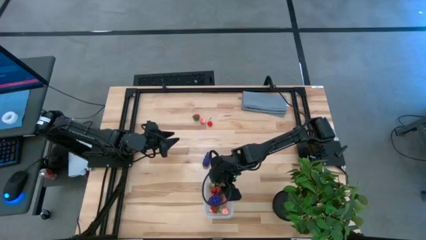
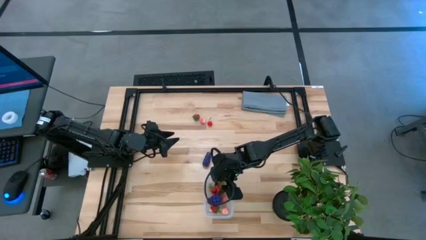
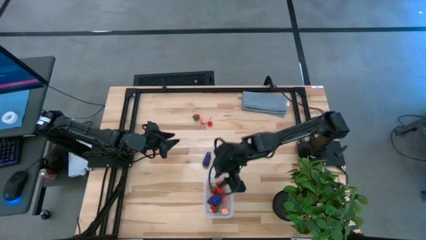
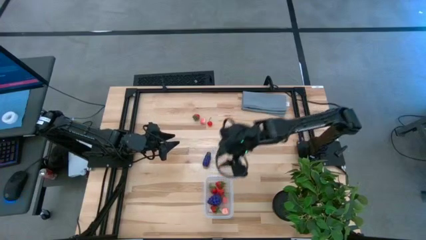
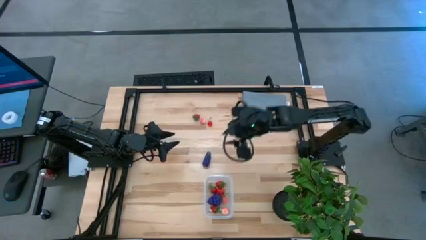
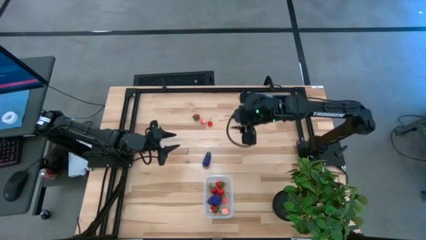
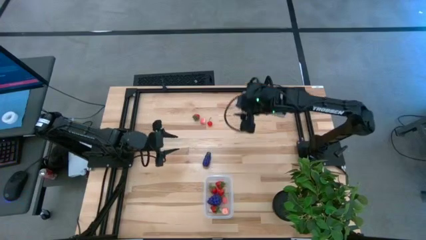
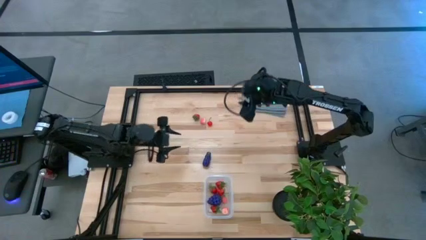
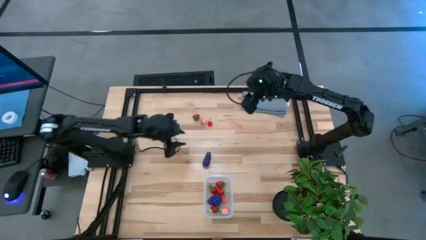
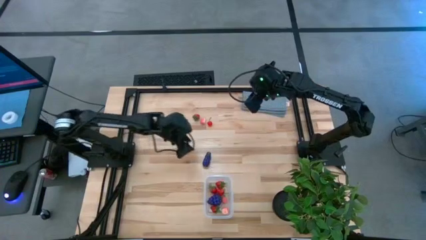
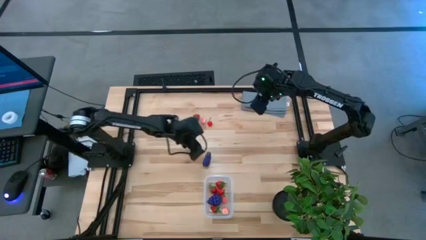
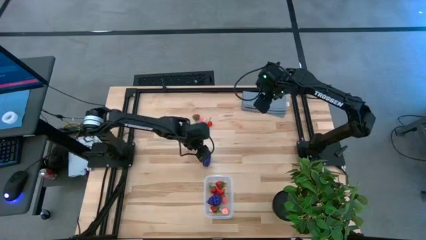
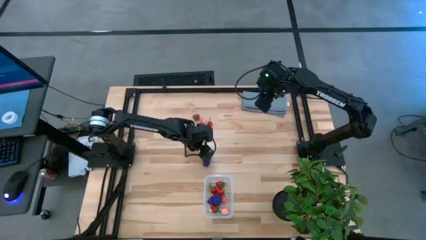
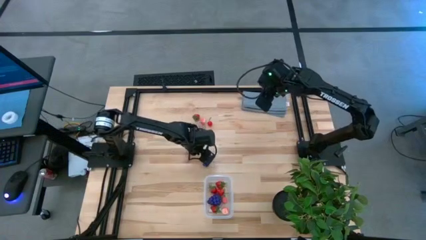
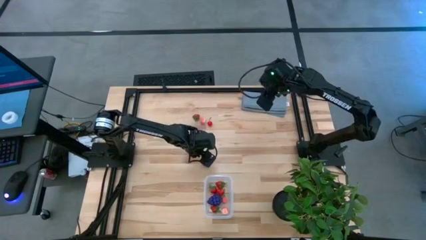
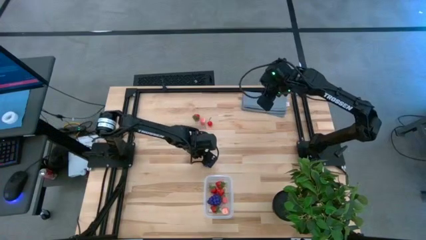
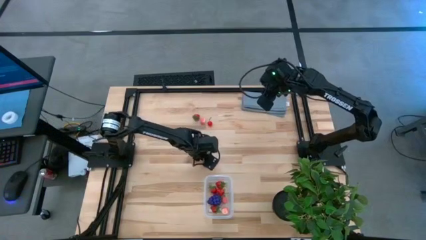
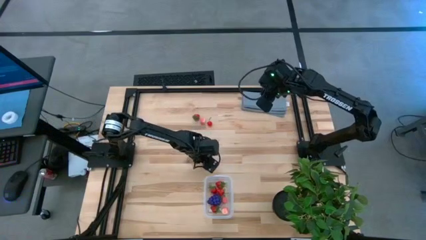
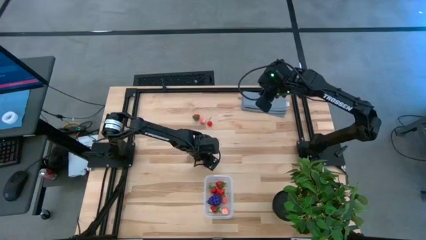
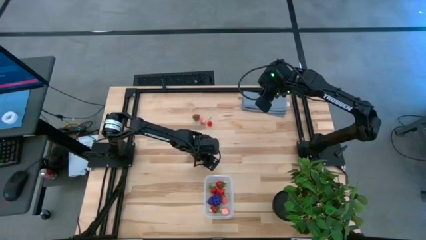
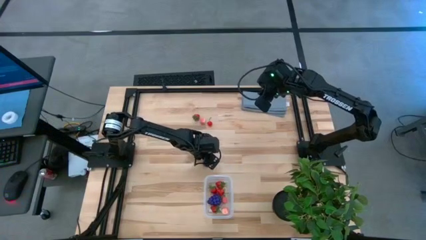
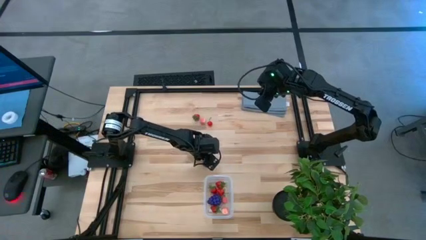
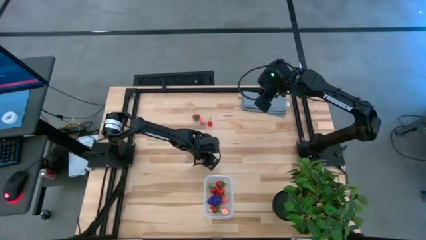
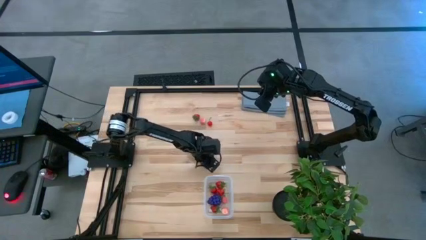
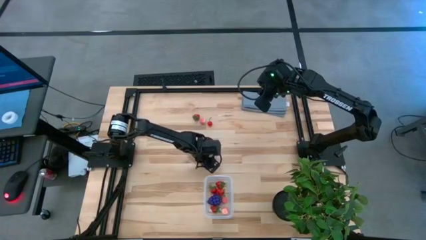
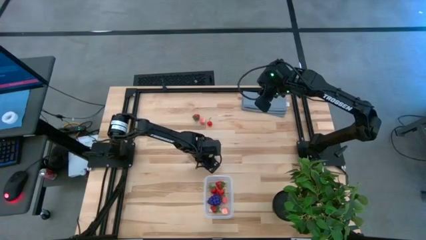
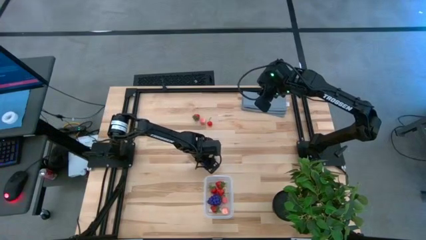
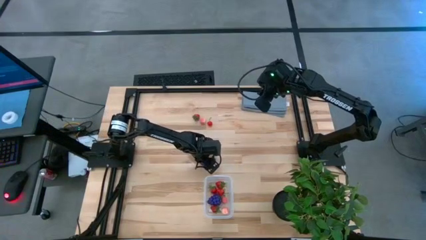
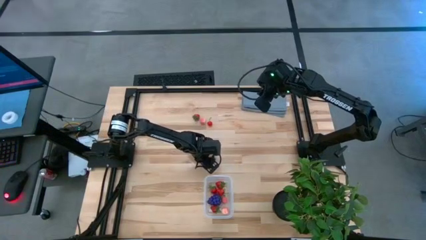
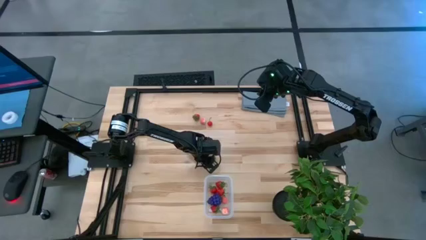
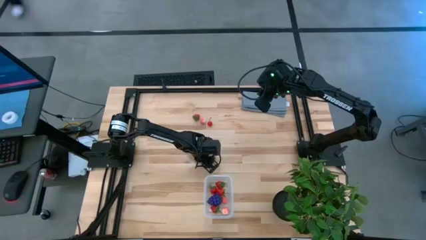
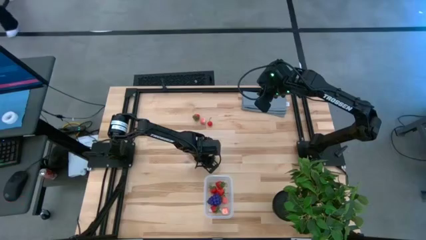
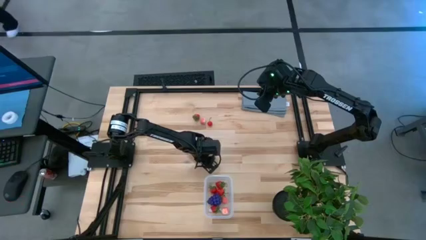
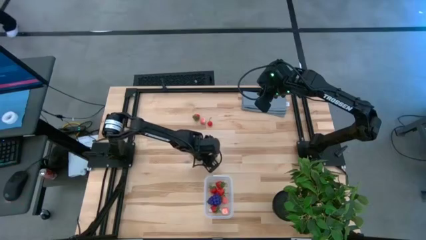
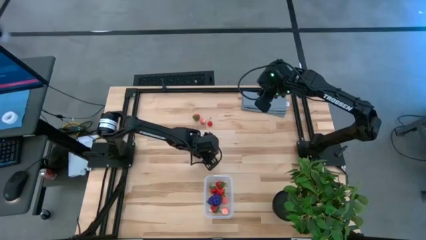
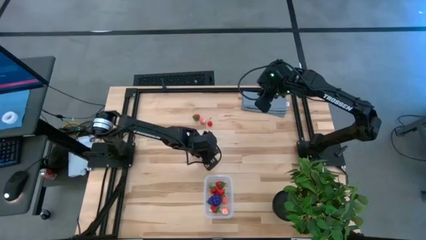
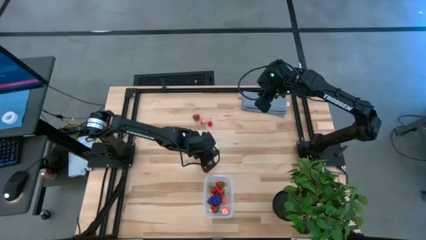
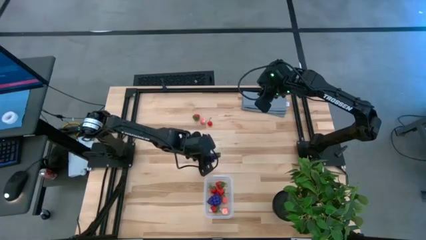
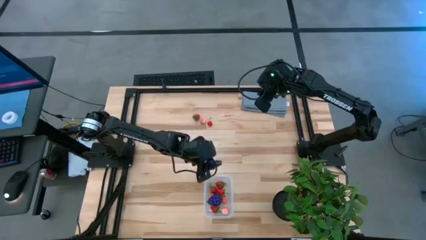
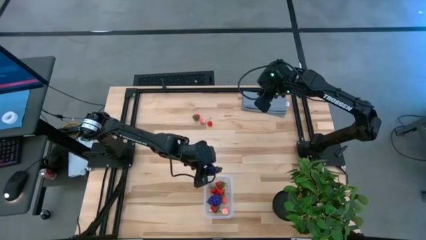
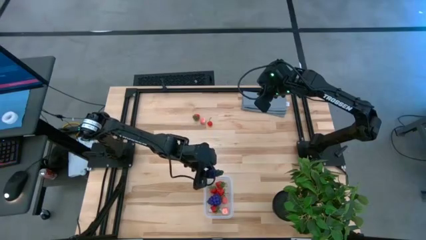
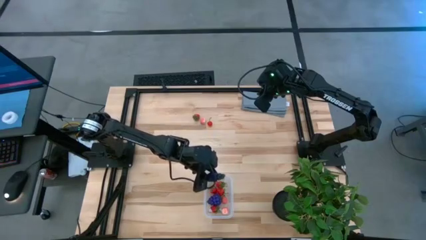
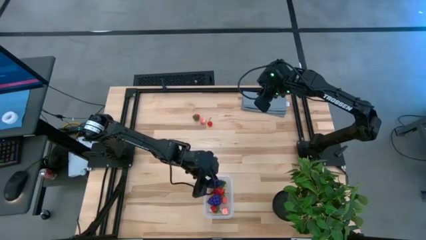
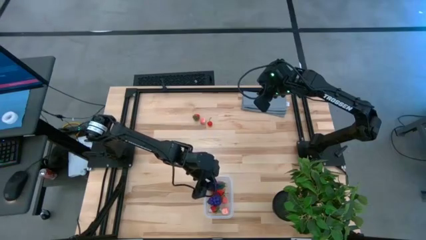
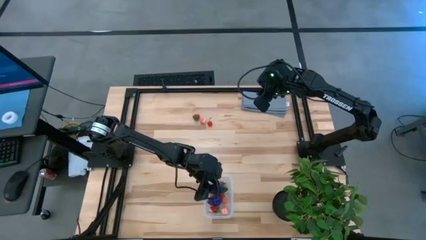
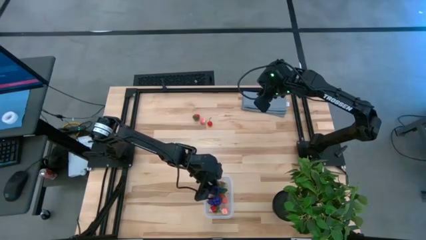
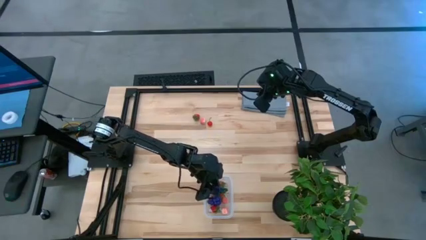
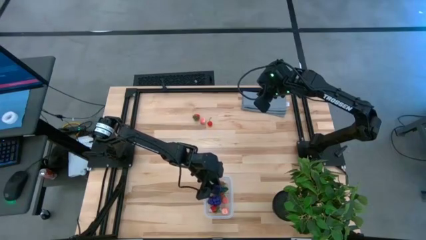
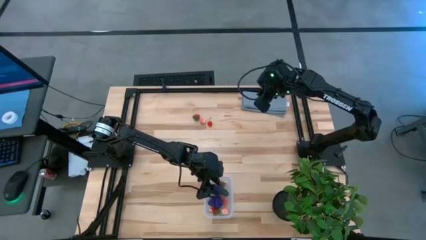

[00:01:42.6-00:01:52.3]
Task: Pick and placing Produce into tupperware
Put the violet eggplant into the transparent bin

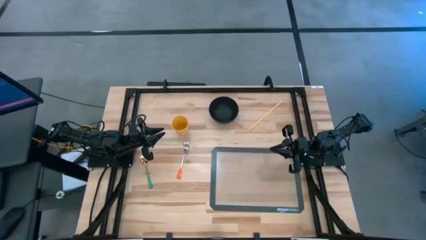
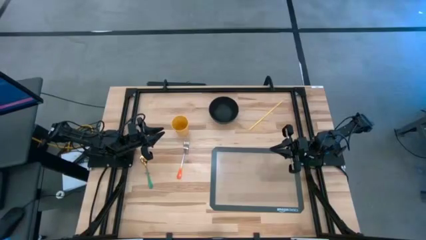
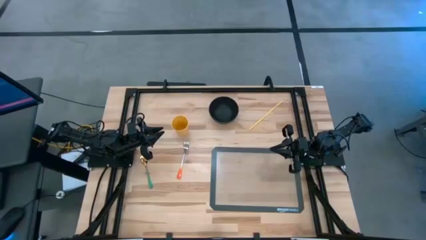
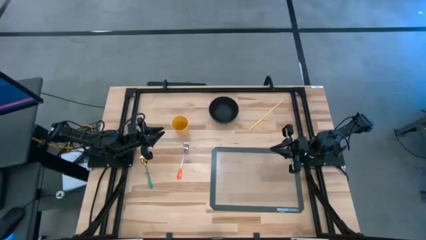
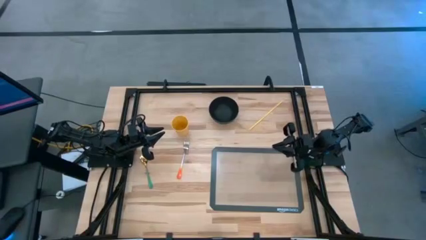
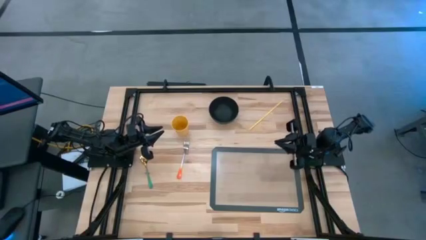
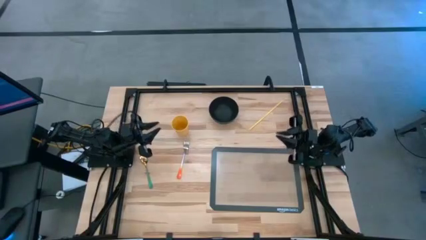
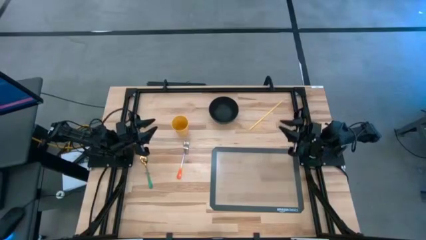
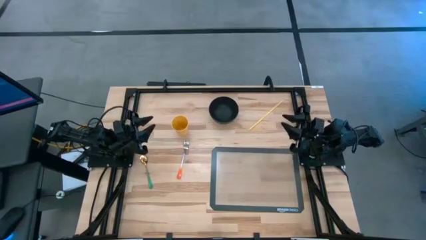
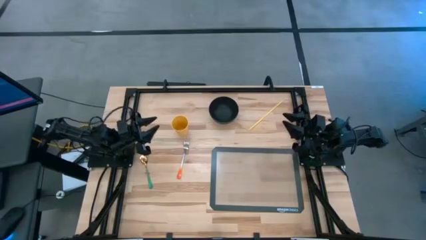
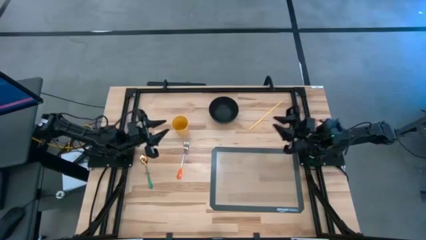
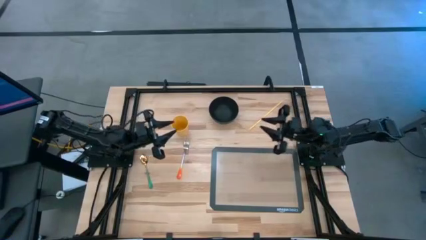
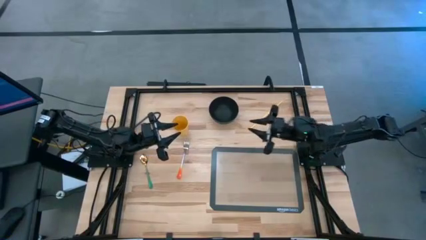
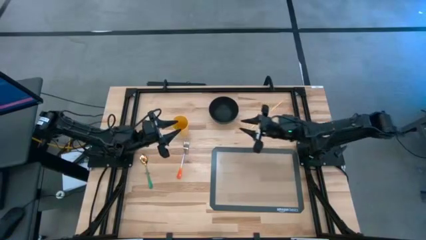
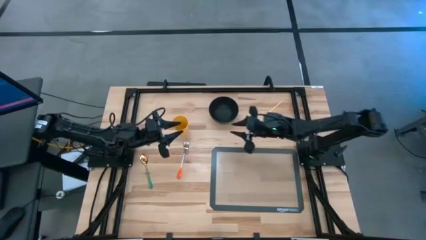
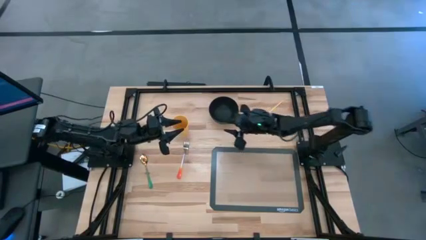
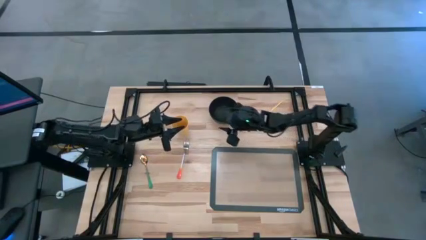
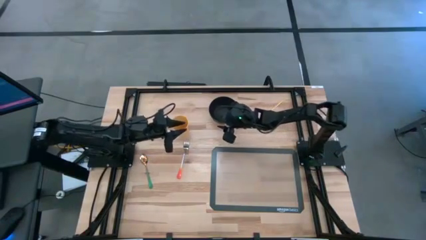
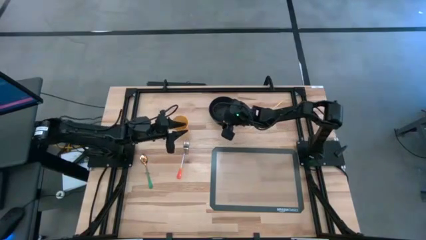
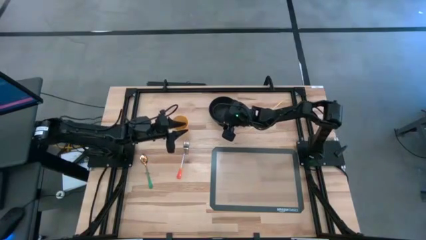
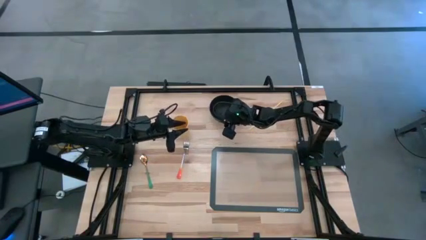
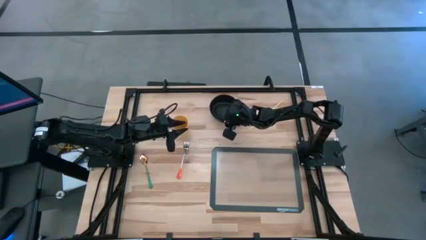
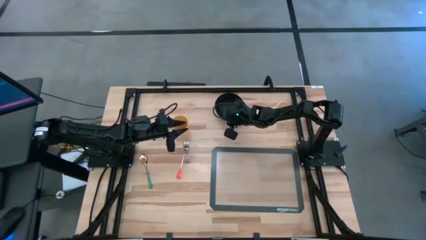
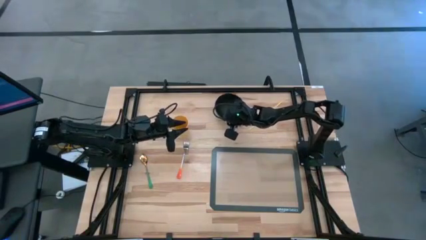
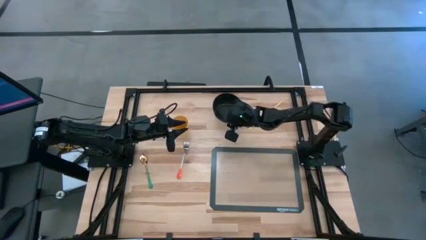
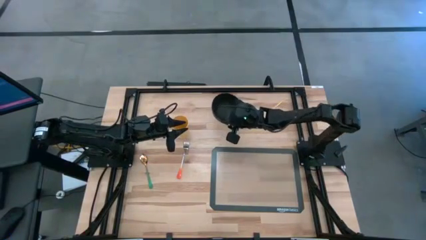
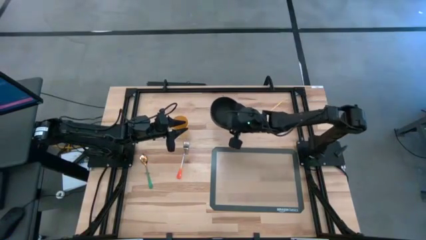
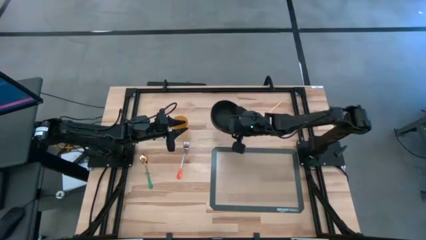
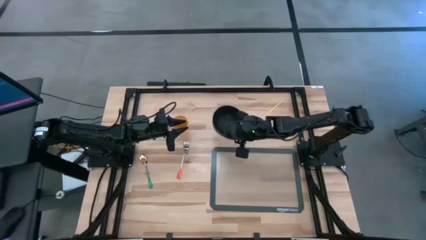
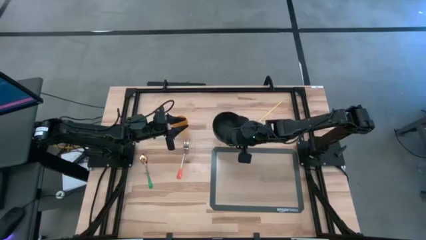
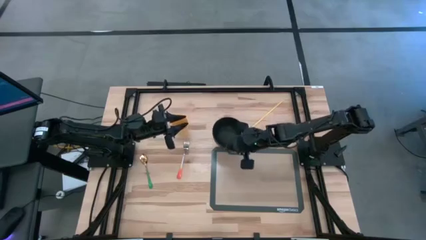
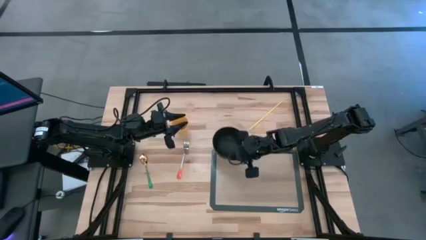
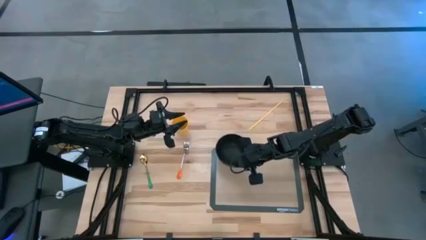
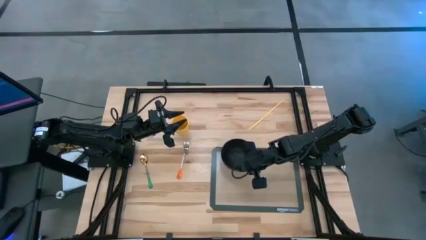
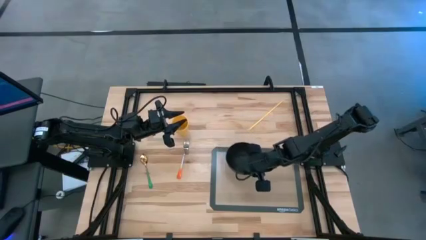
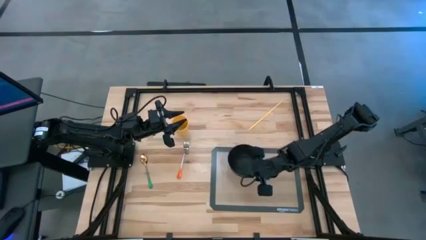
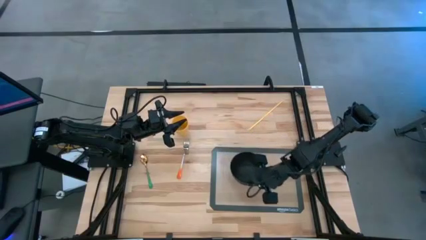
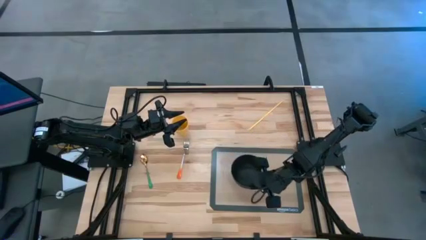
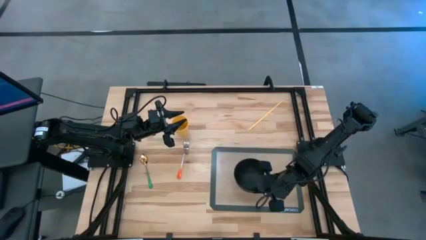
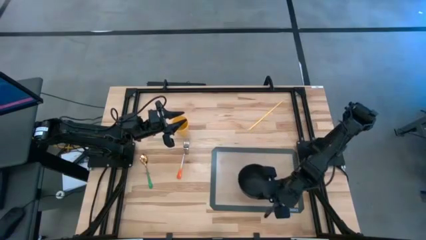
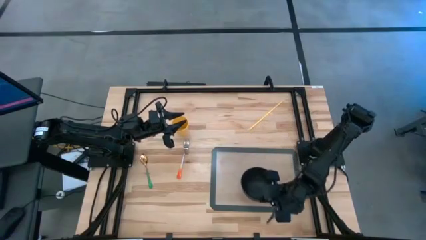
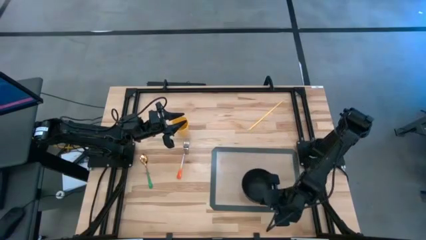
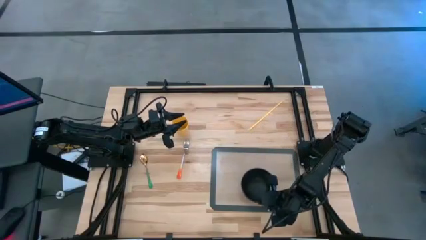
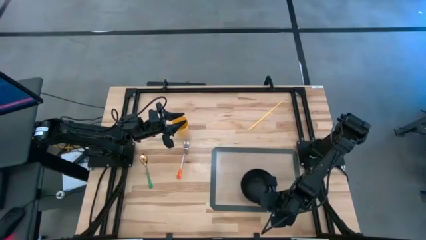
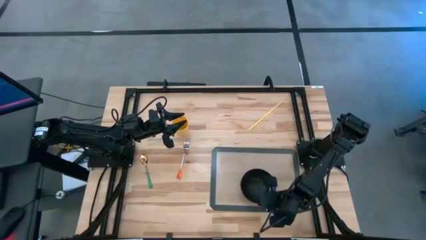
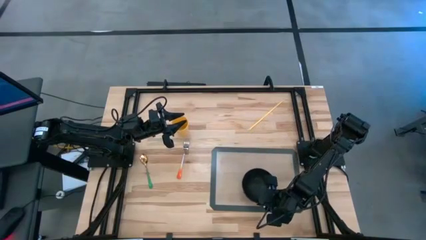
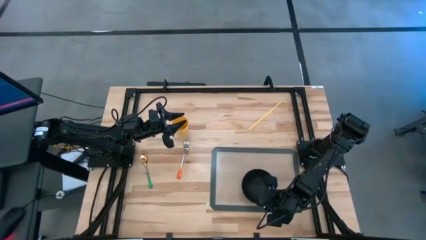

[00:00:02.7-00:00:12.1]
Task: Pick & Place Utensil
Put the black bowl on the table placemat
